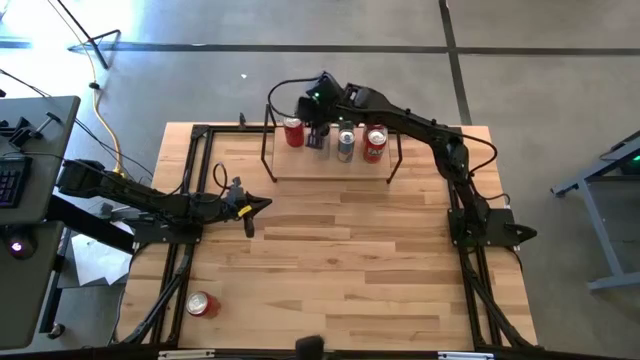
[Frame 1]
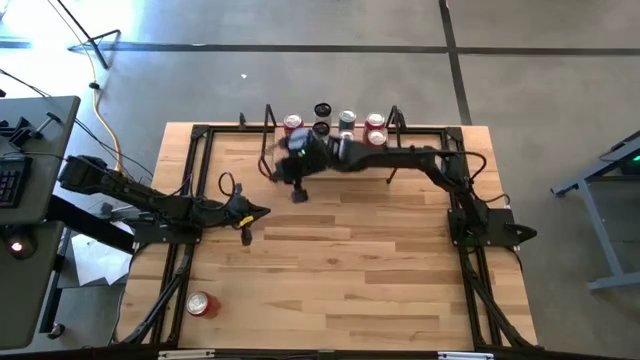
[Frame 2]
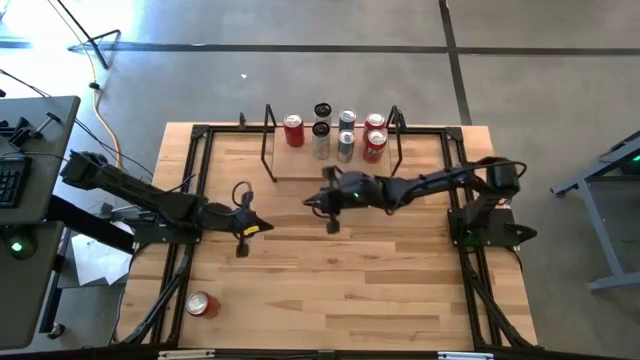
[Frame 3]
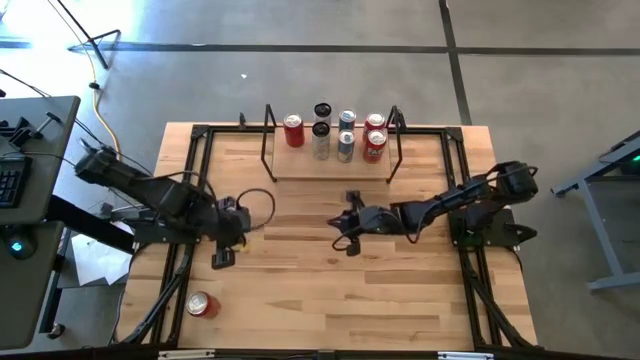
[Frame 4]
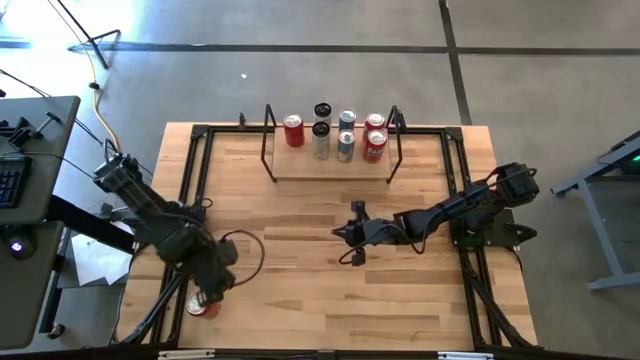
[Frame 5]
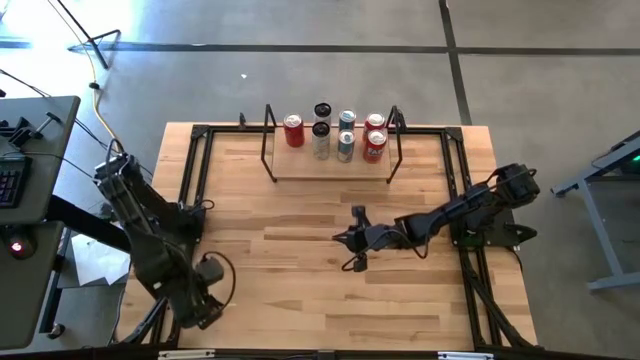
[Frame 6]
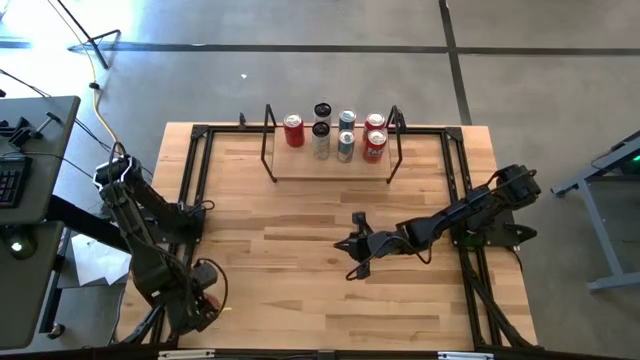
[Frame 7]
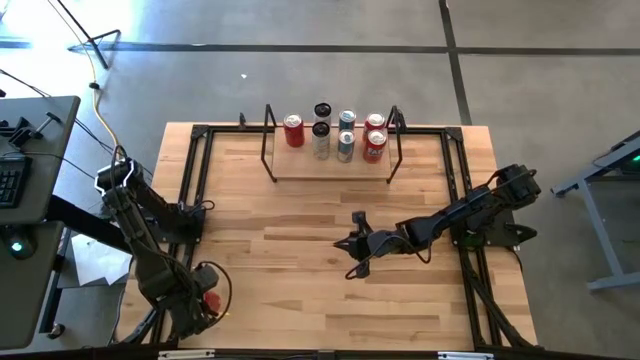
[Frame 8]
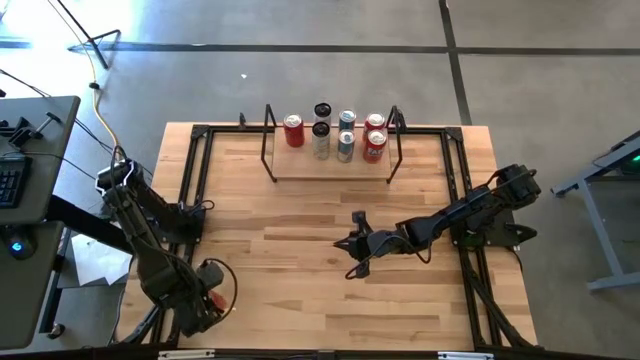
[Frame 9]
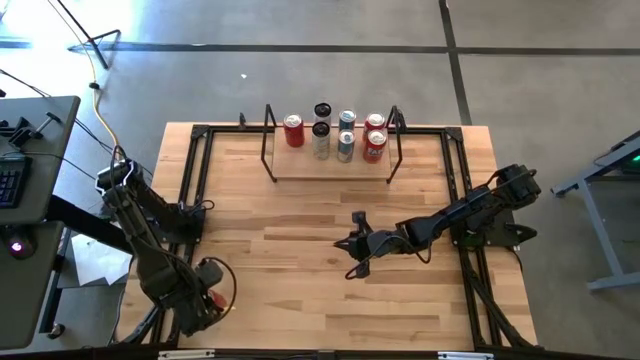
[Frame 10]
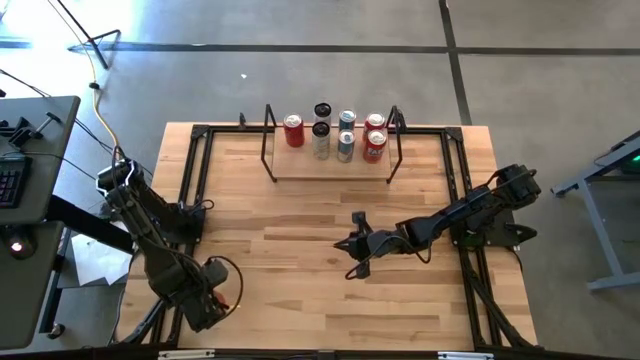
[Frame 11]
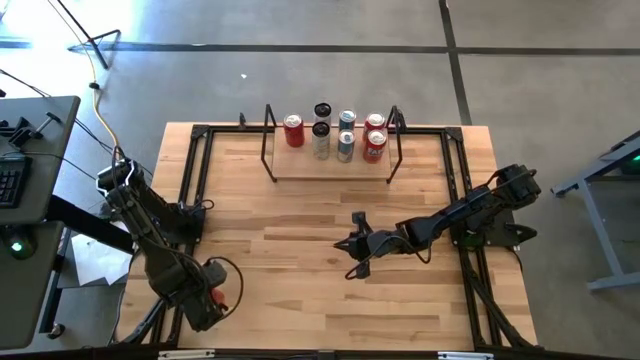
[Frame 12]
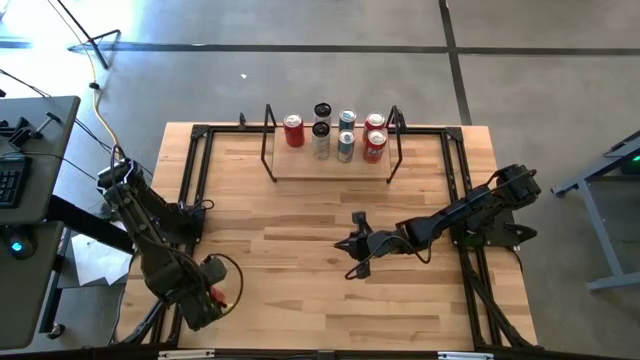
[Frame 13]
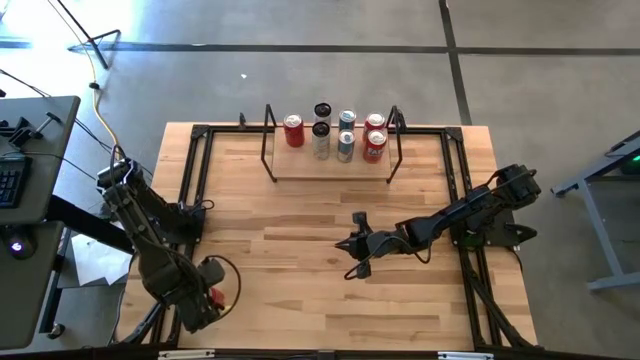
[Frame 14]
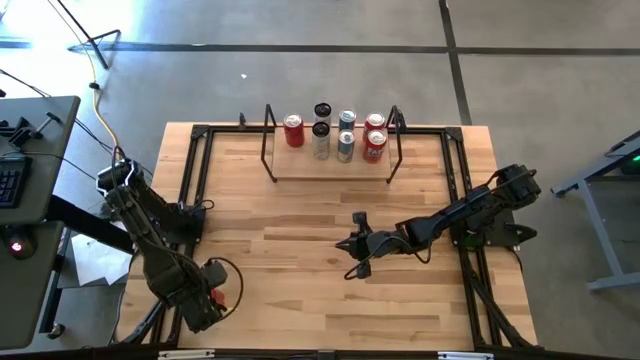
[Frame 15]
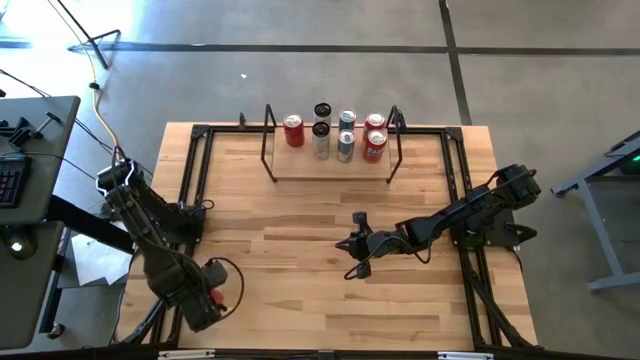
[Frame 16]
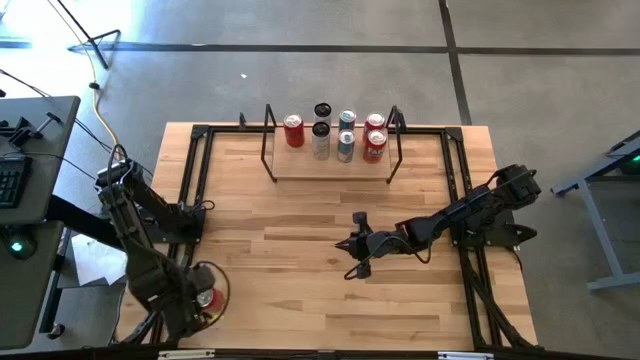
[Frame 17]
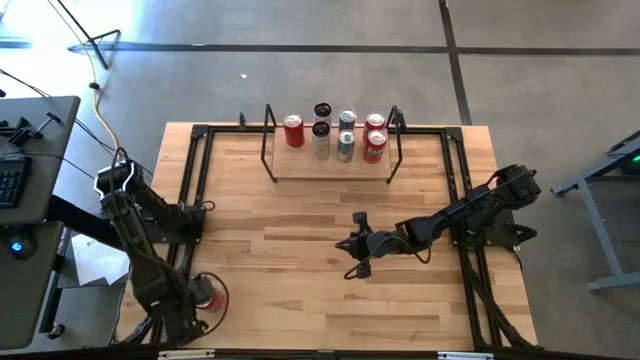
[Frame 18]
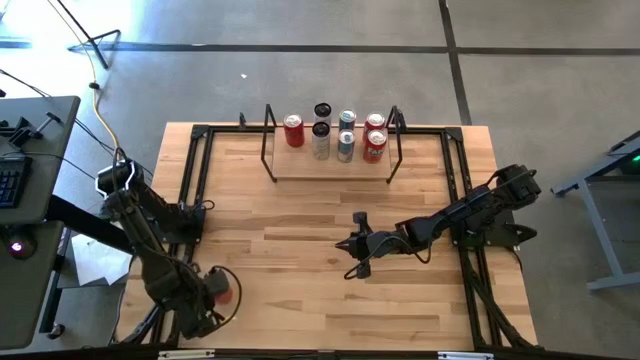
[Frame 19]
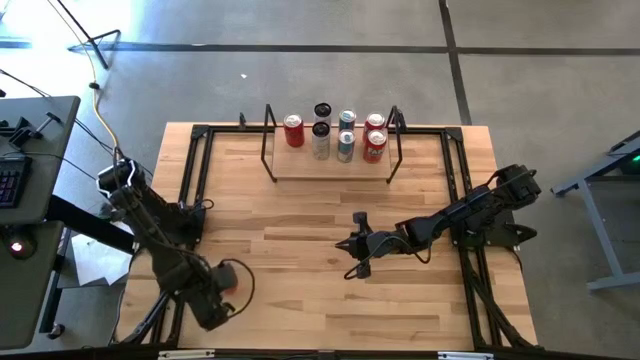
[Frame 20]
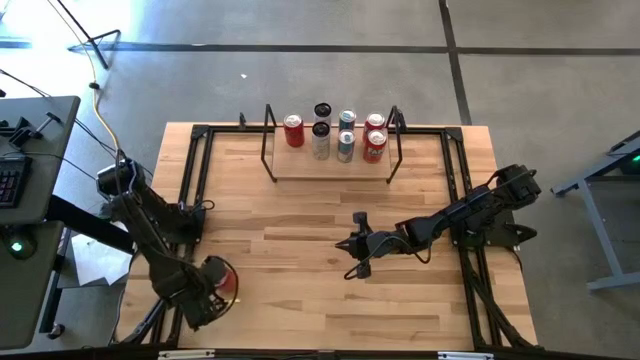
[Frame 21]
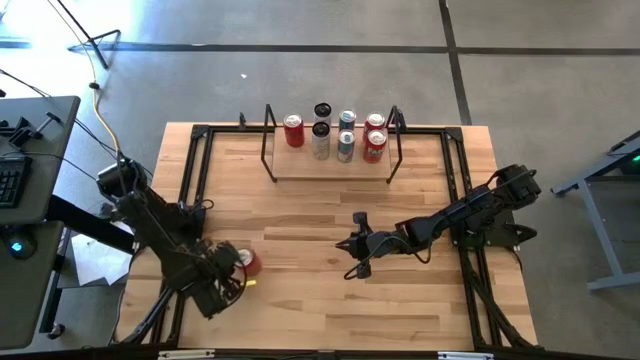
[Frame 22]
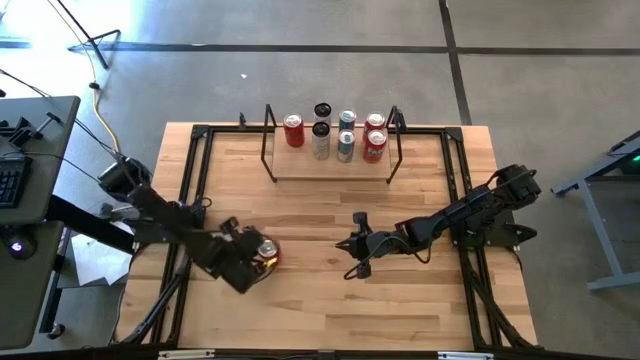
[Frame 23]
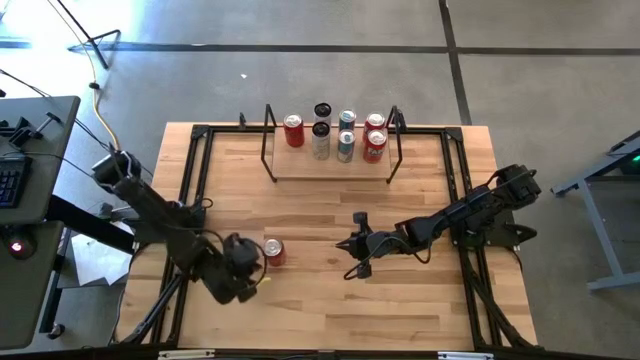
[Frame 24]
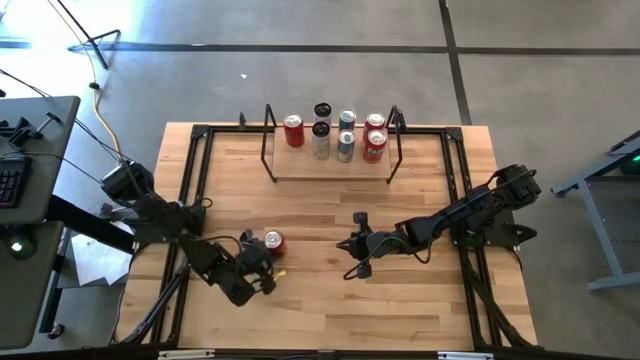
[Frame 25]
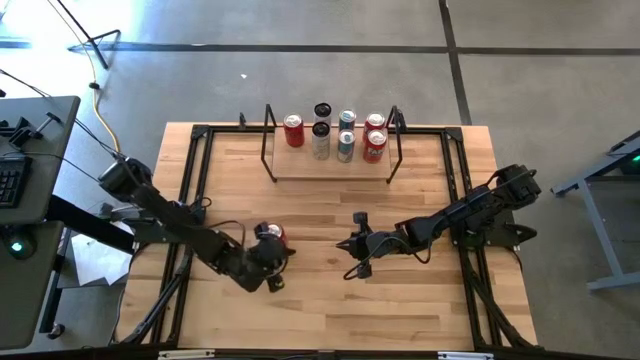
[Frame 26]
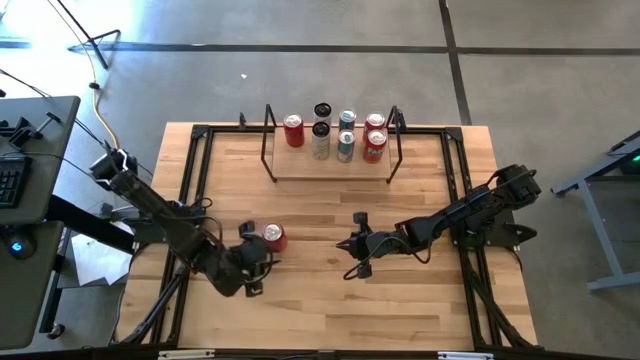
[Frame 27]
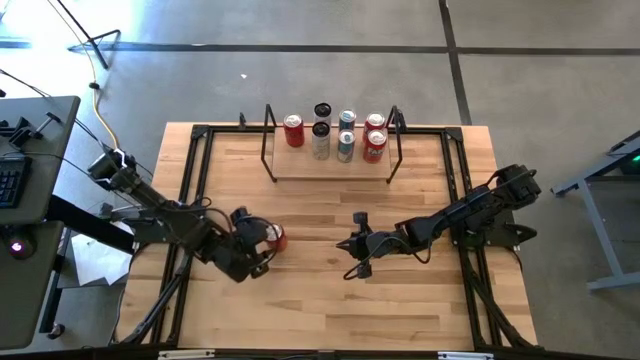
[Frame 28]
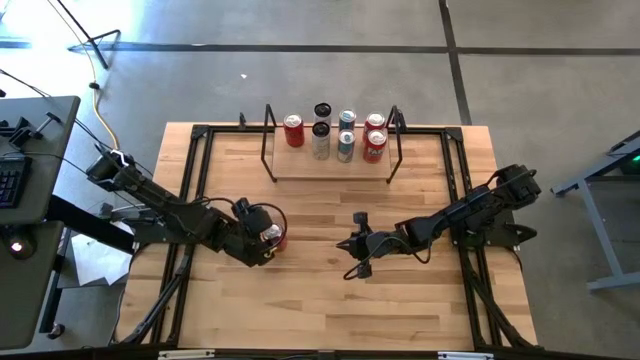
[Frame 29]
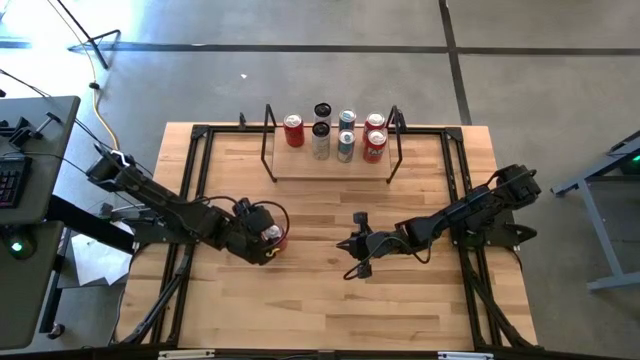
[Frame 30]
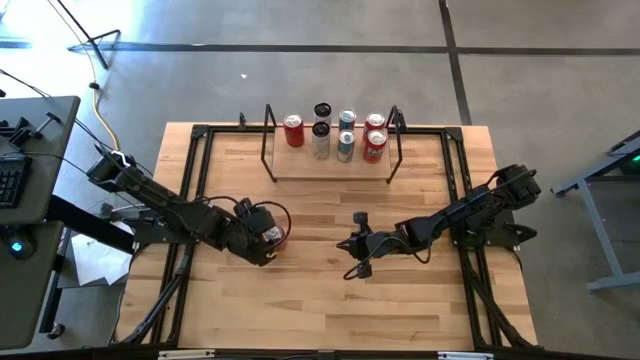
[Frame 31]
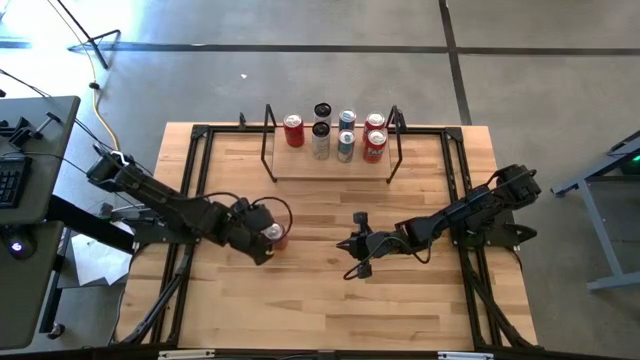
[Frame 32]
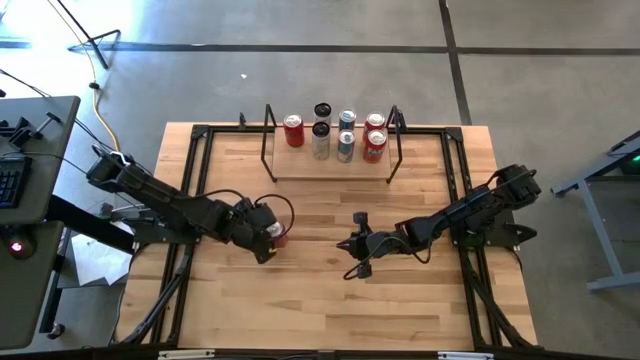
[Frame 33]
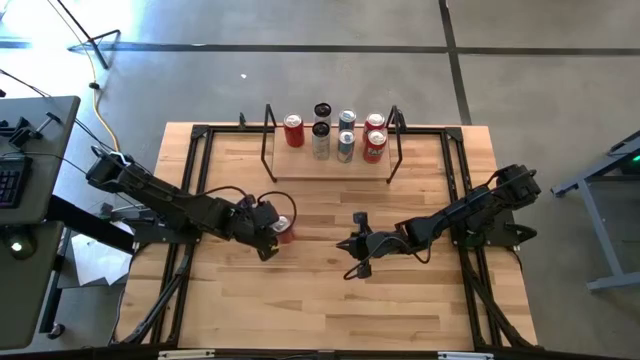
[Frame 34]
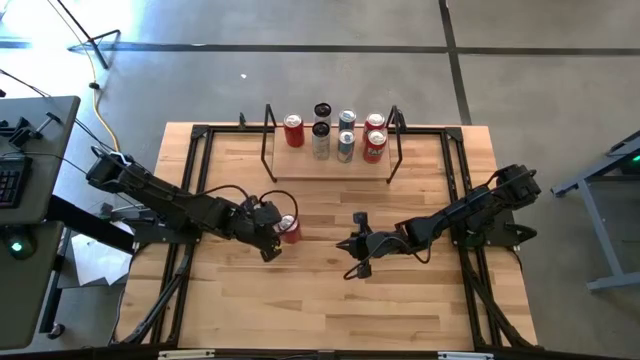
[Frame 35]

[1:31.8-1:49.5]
Task: Place canned beverage on shelf
Put the red black soda can on the shelf aligned with the other red black soda can

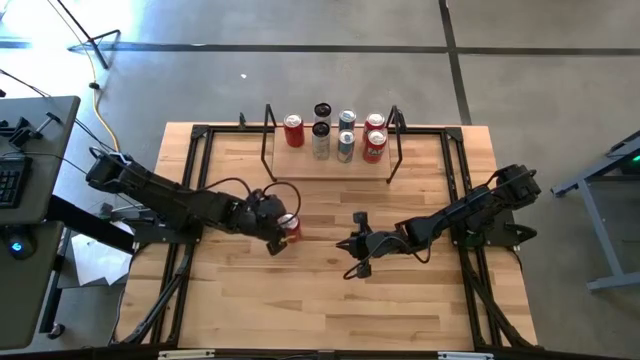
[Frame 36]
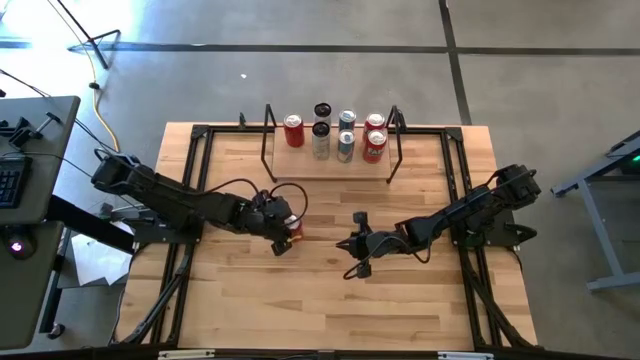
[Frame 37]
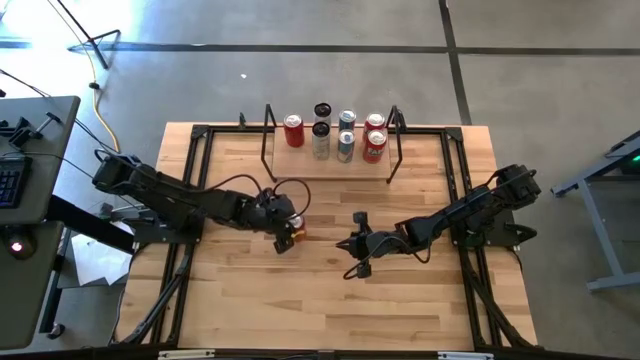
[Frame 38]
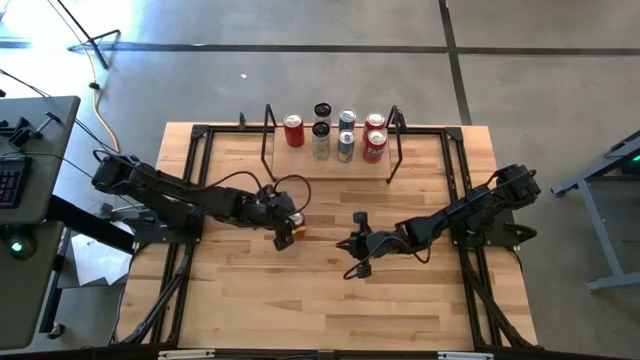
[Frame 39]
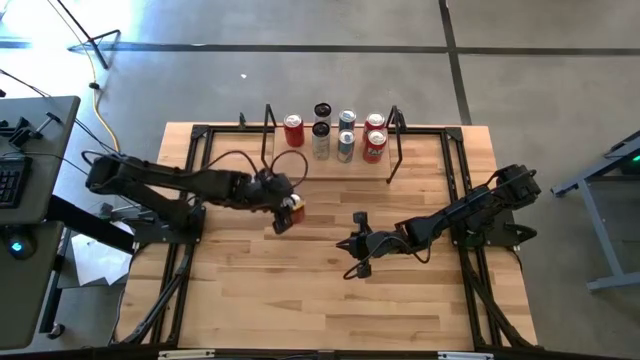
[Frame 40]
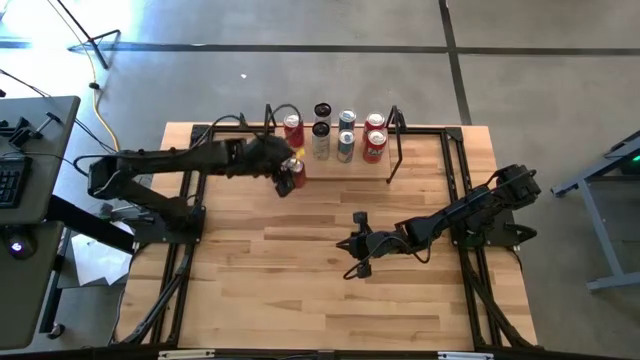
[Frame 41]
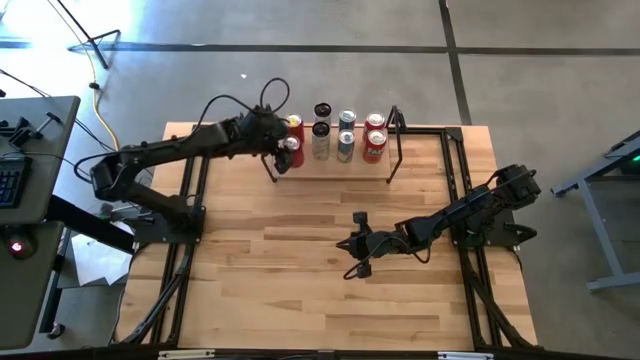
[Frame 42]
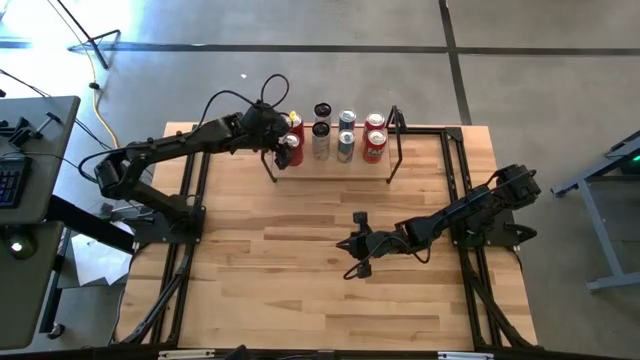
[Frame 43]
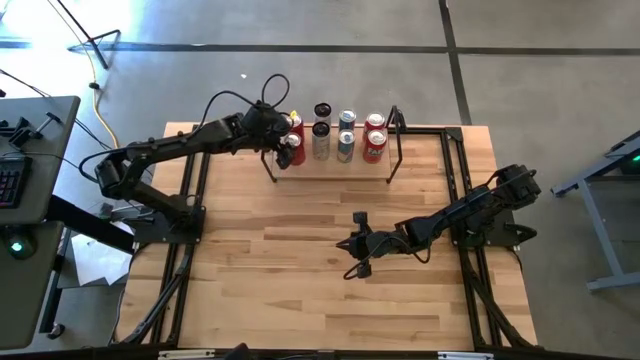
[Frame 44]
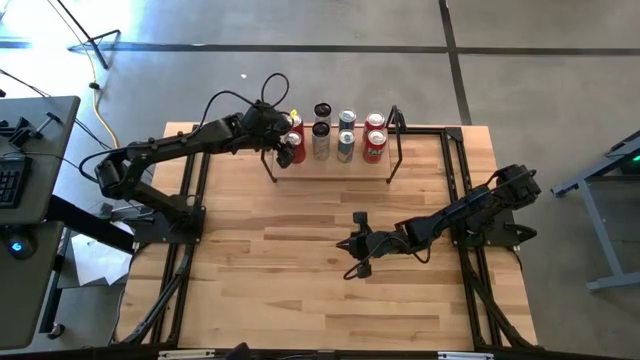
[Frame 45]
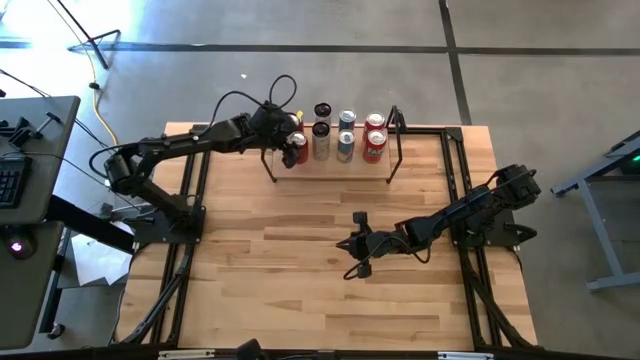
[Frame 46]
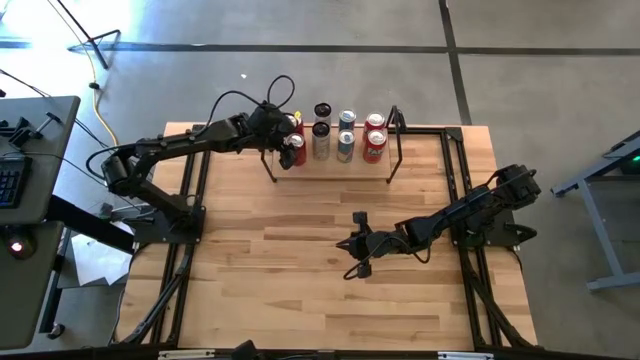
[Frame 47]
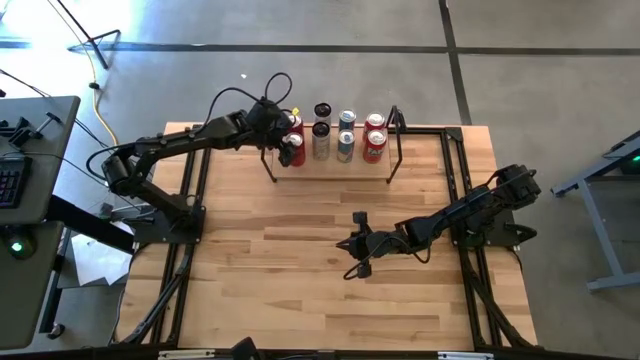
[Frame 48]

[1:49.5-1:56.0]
Put the red black soda can on the shelf aligned with the other red black soda can
